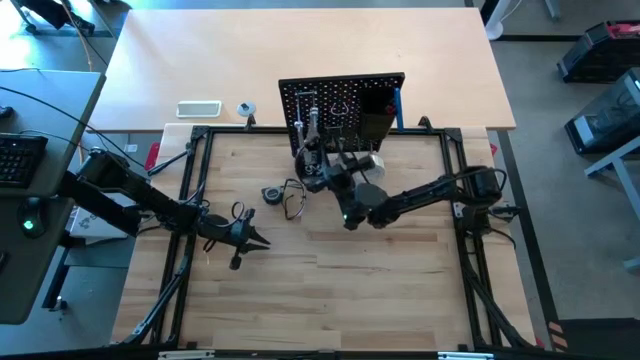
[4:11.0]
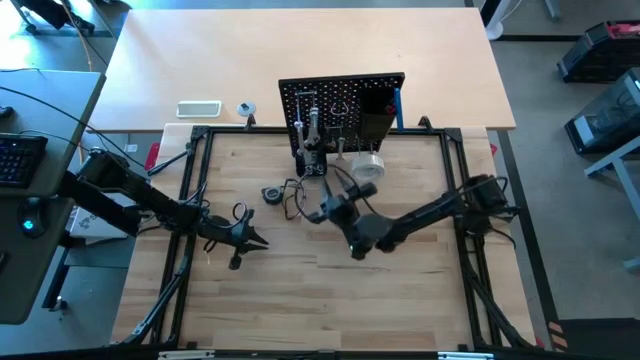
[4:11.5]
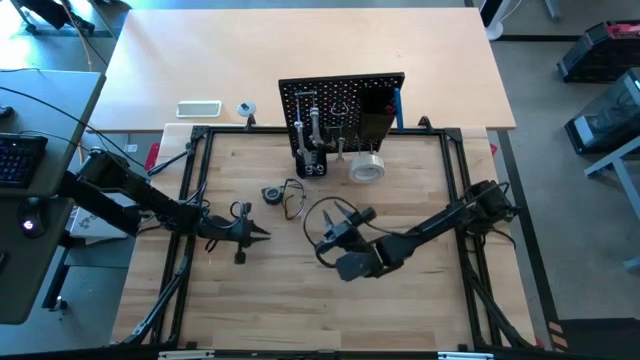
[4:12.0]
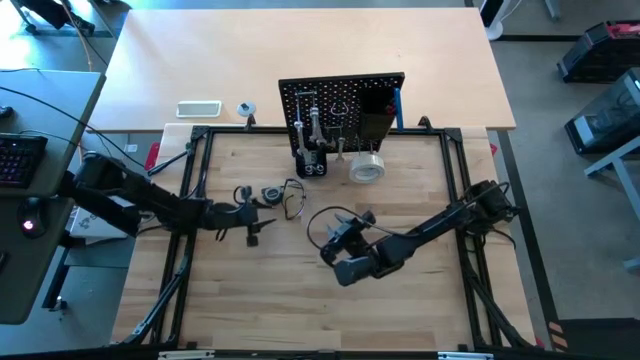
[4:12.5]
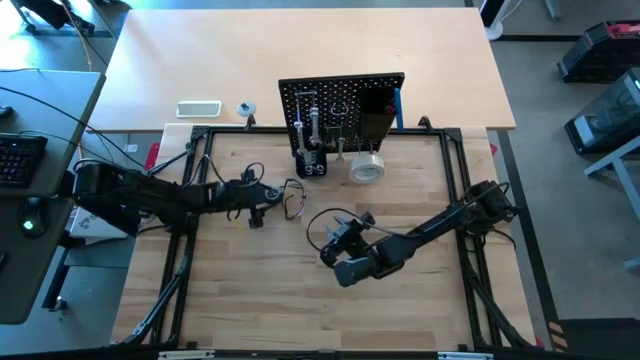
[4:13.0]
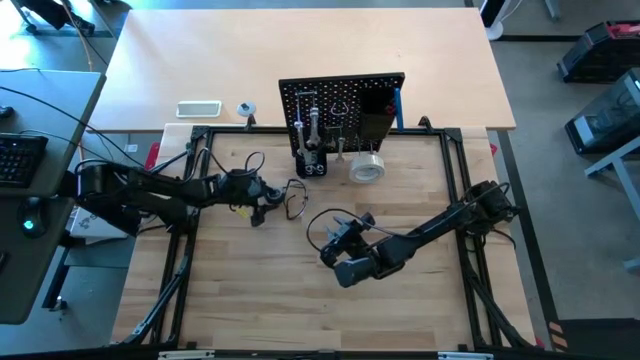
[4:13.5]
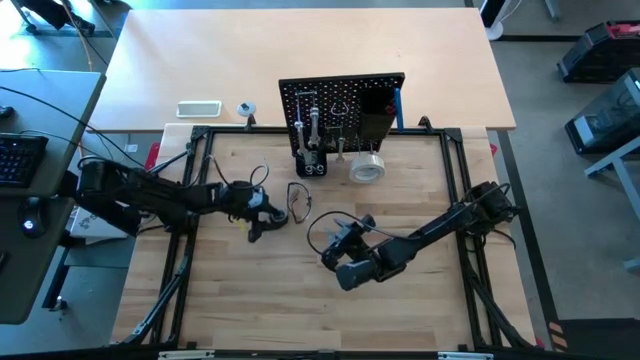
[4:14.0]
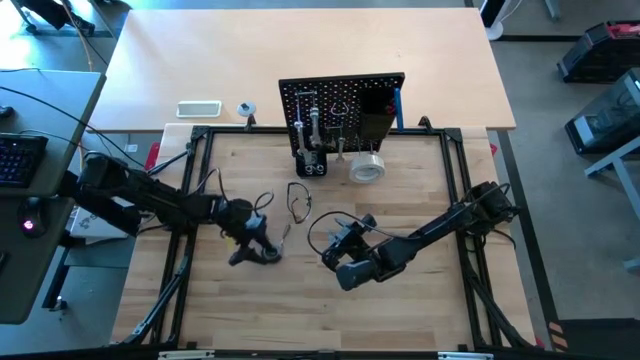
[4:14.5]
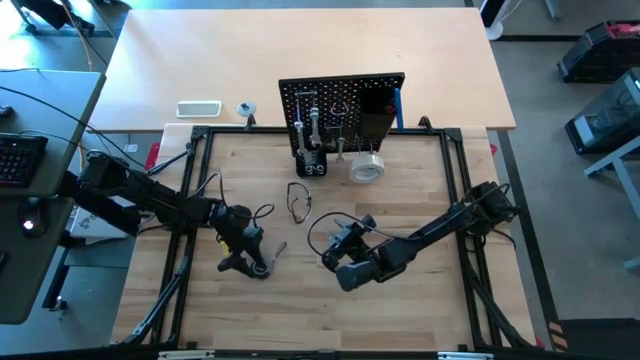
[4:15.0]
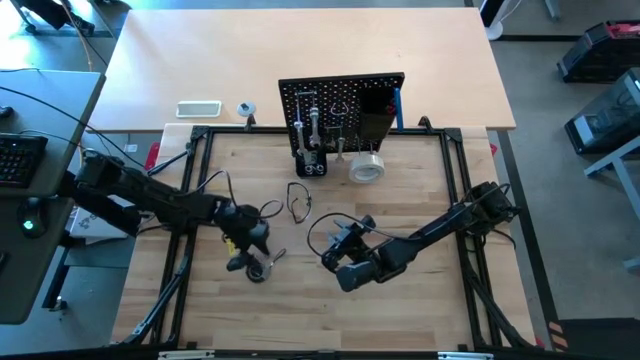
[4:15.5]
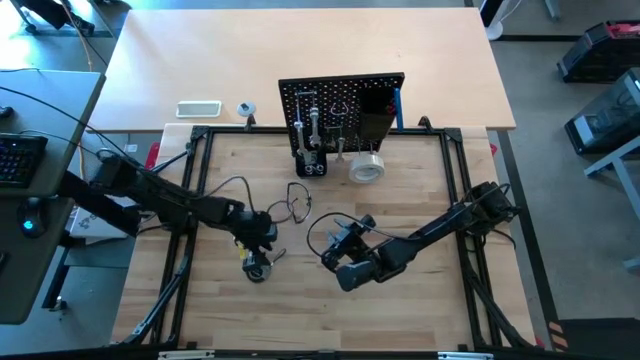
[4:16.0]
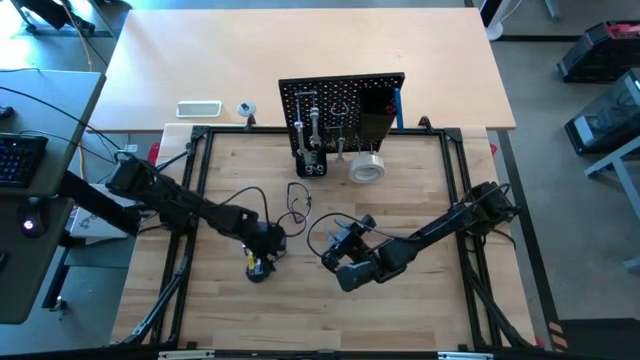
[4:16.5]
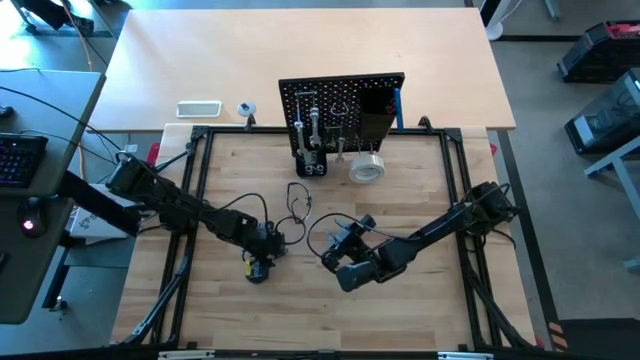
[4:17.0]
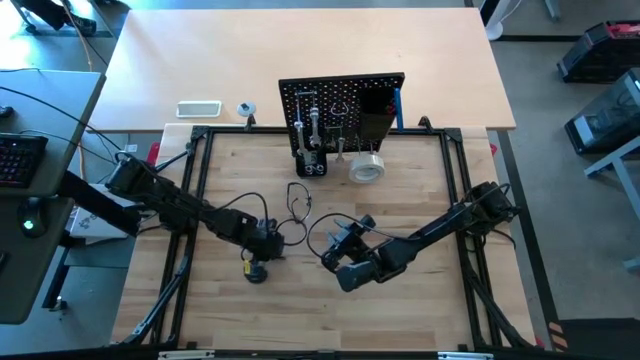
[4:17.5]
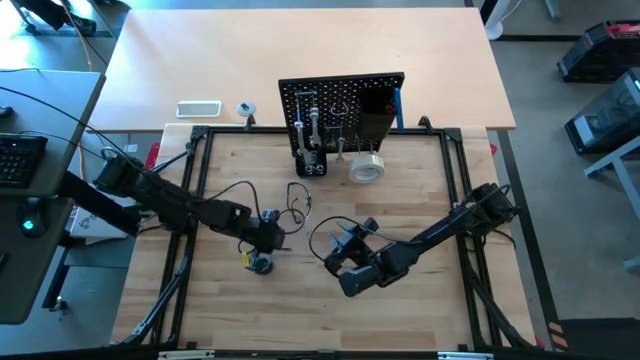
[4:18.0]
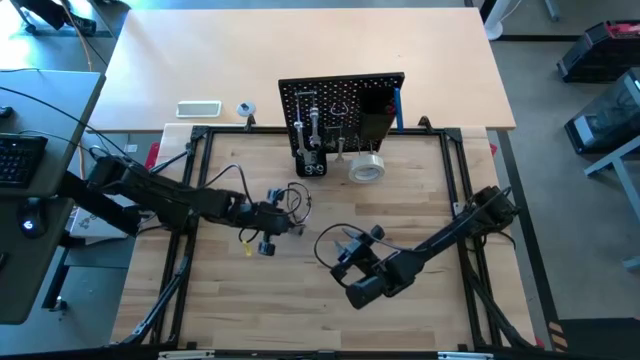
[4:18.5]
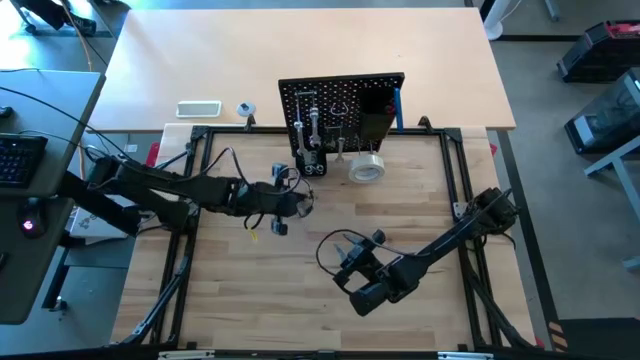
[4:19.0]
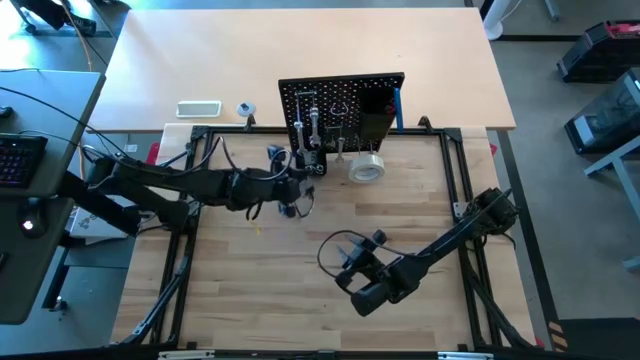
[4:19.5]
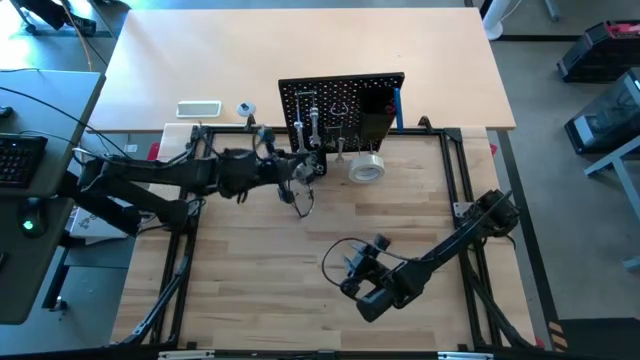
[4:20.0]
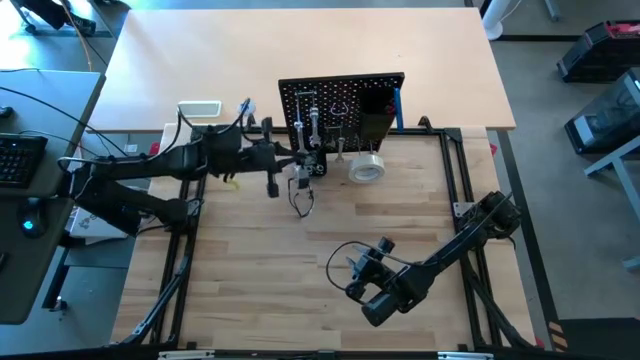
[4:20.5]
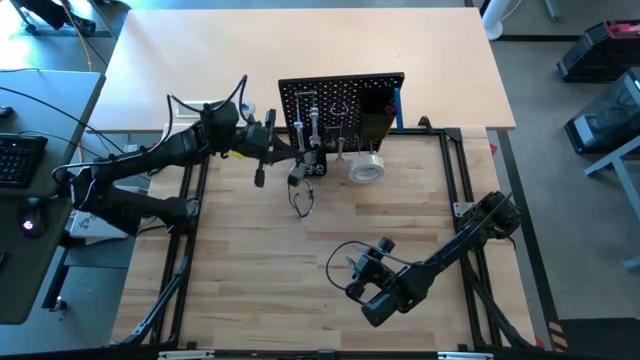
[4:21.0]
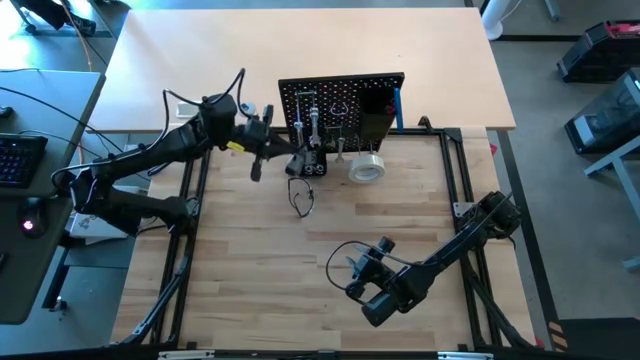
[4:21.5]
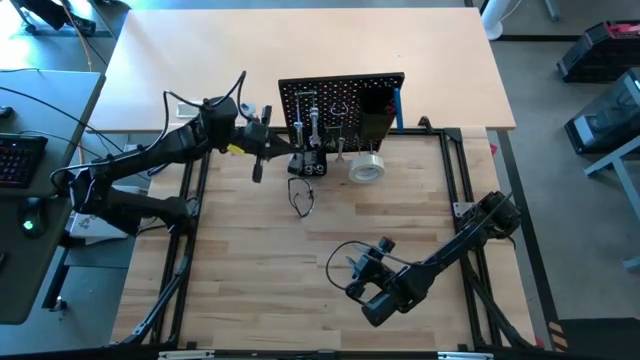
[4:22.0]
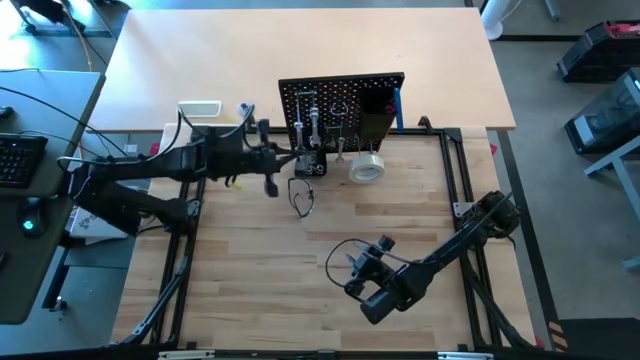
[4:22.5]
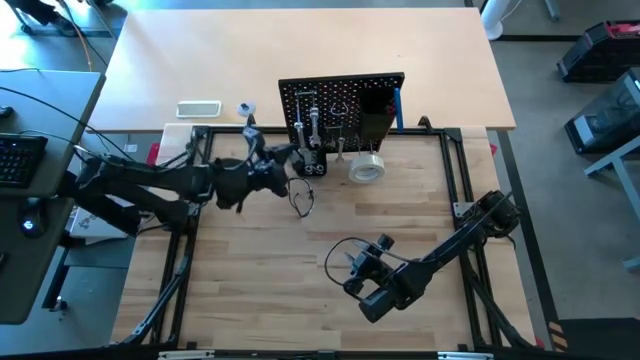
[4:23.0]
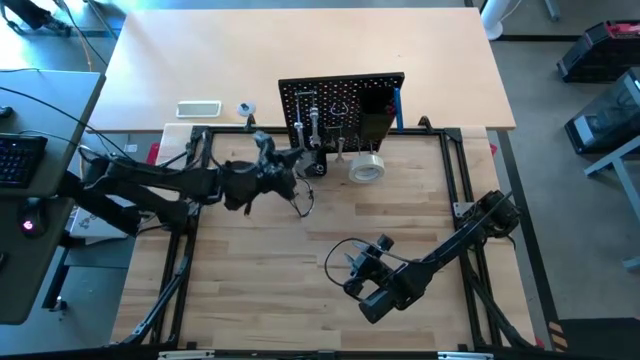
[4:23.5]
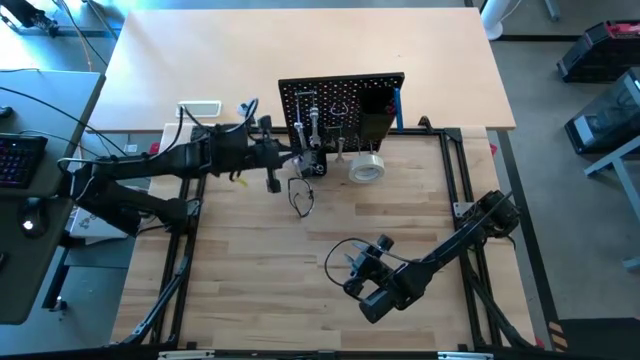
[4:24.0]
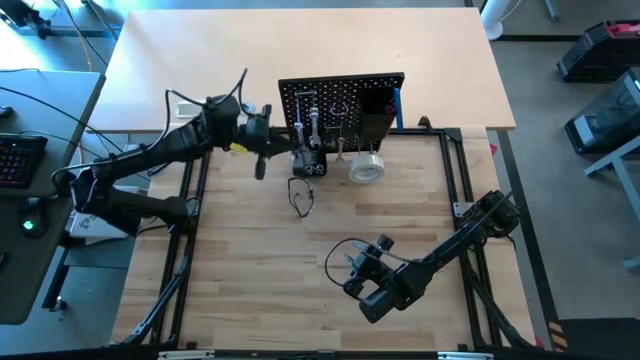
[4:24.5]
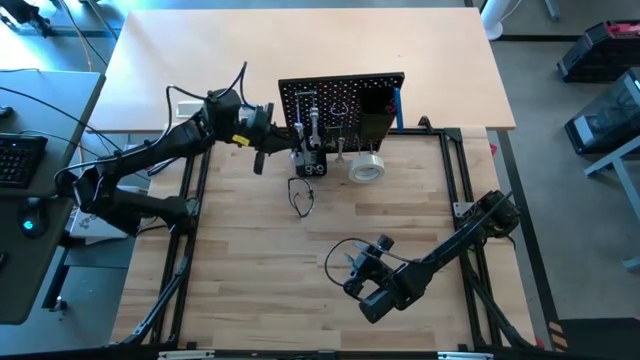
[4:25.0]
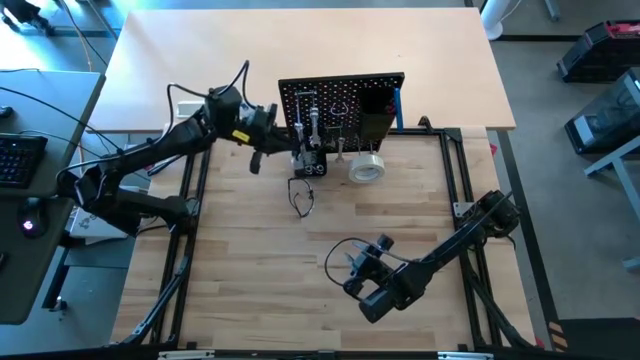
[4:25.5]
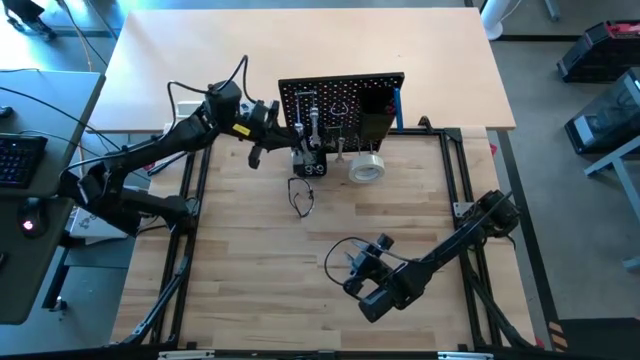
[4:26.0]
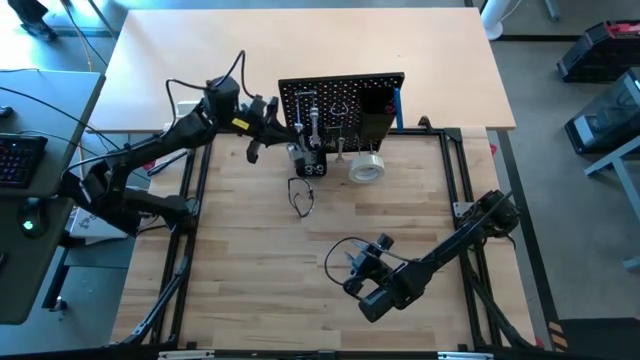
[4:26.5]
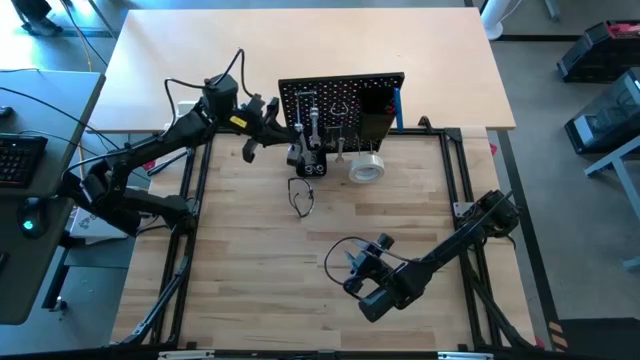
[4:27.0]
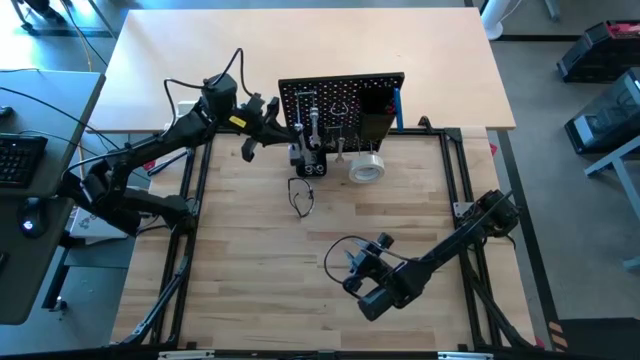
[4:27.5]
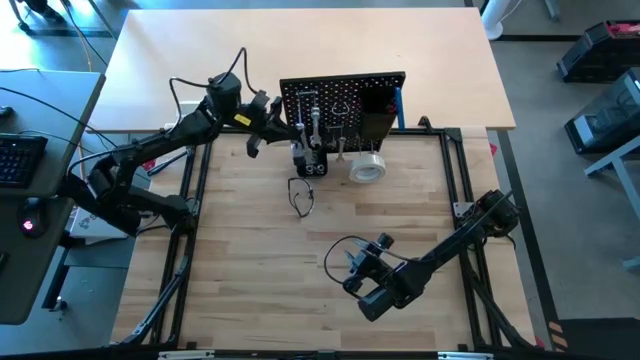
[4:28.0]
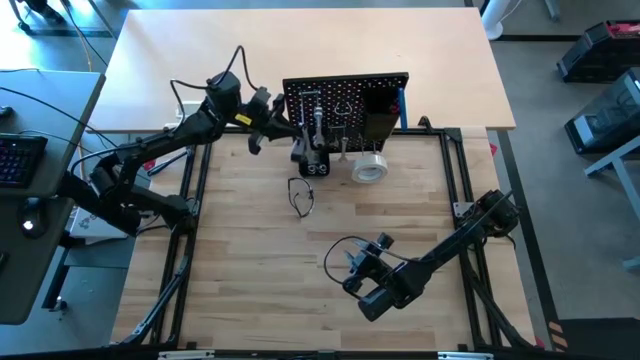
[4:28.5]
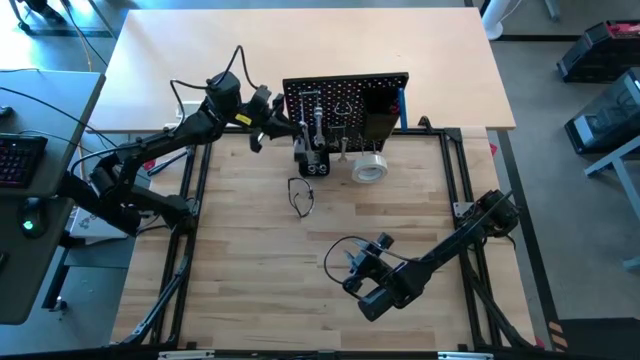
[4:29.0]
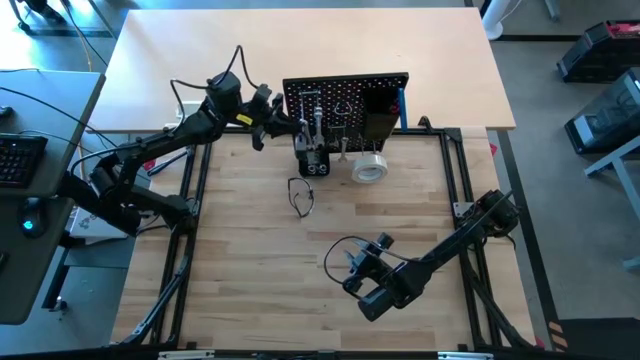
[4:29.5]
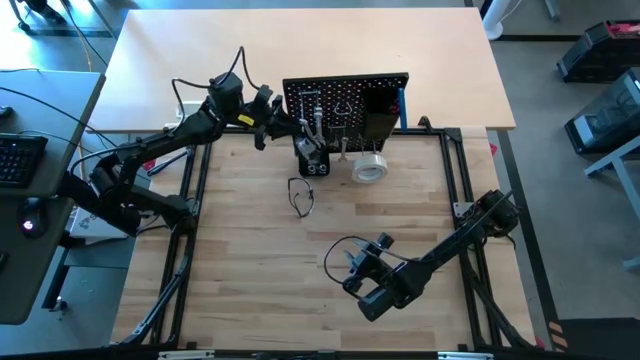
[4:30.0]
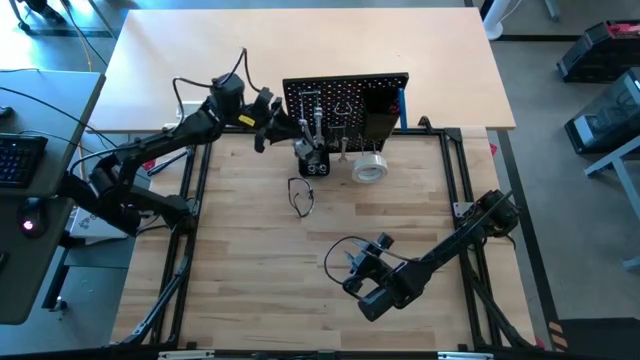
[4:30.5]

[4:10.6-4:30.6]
Task: Hang tools onto peg board
Hang the black tape measure on the pegboard

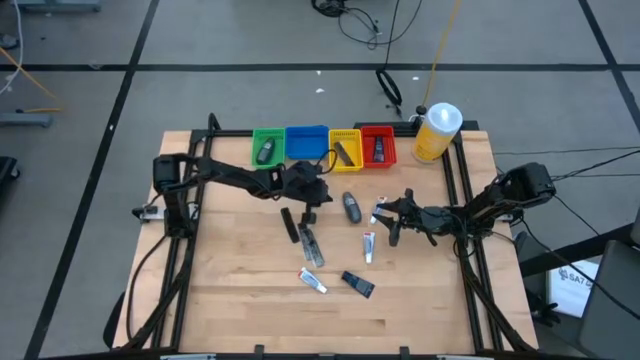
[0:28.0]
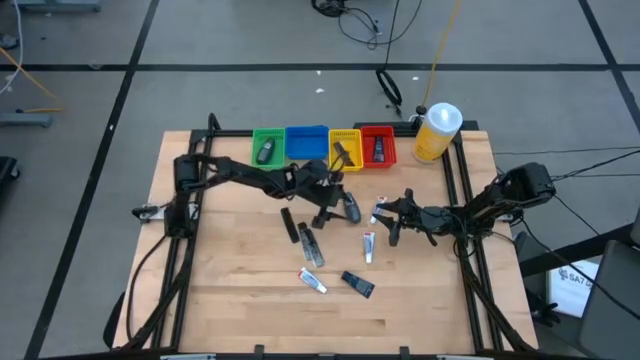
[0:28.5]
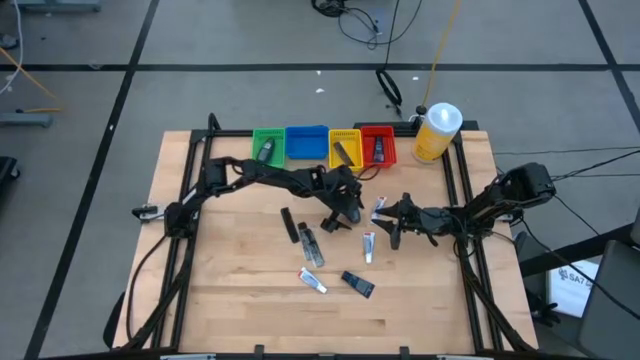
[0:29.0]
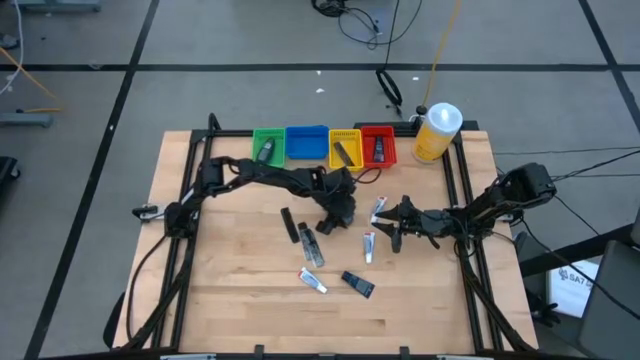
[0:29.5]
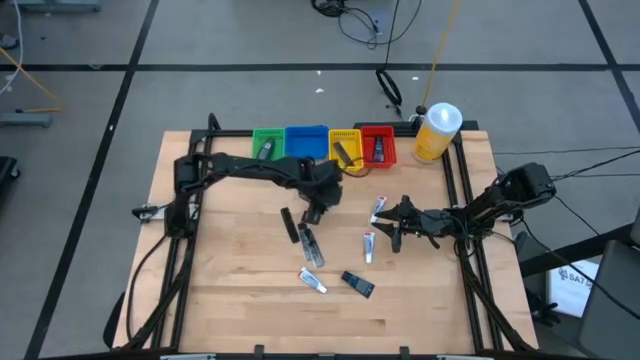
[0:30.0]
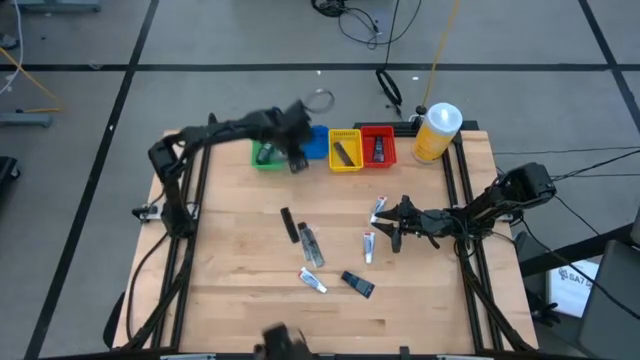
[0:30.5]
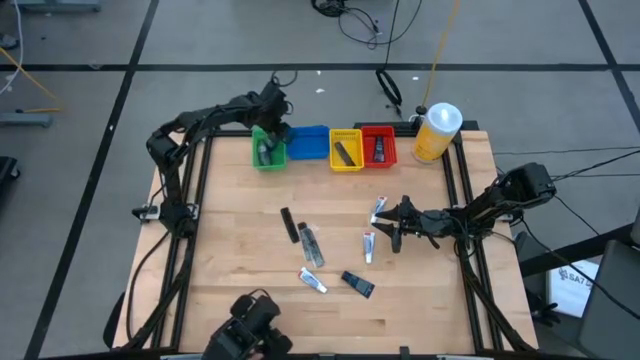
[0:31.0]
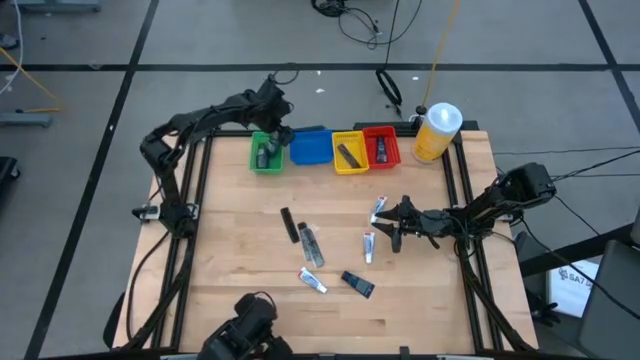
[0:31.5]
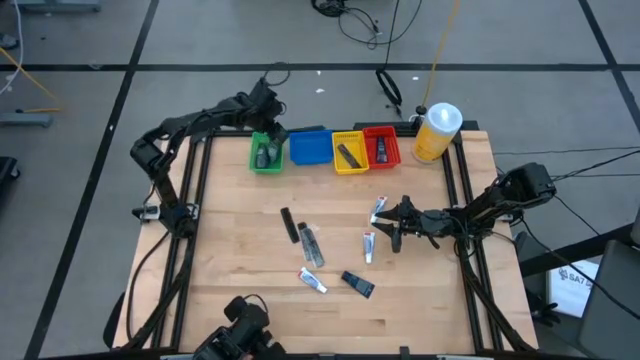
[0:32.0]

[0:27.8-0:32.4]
Task: Pick & Place Travel size toiletries
Put the black deodorant into the green bin
